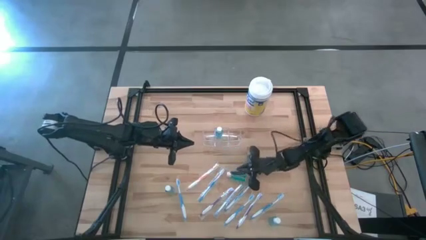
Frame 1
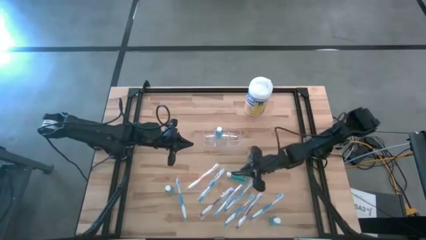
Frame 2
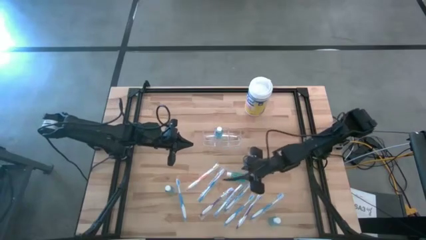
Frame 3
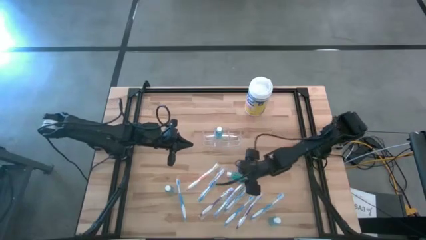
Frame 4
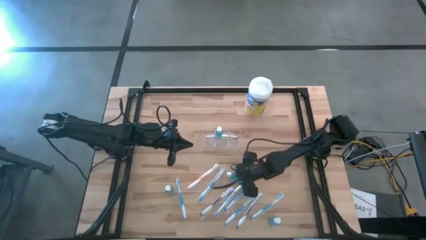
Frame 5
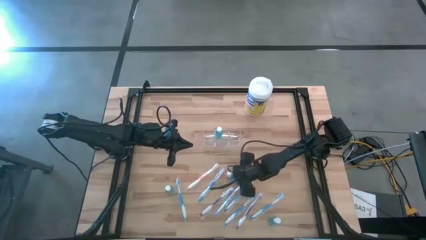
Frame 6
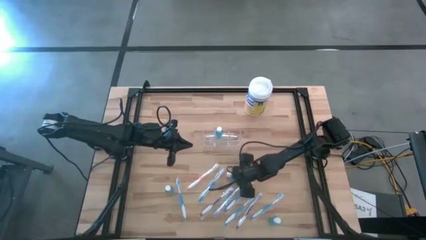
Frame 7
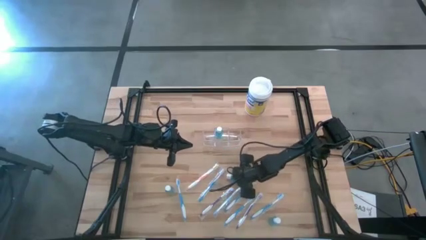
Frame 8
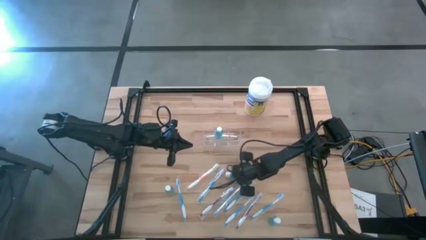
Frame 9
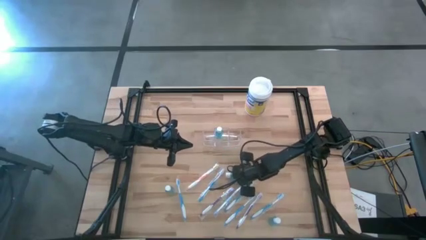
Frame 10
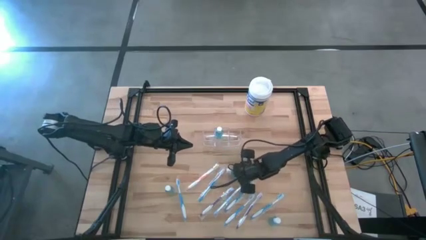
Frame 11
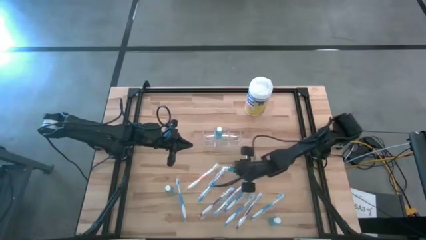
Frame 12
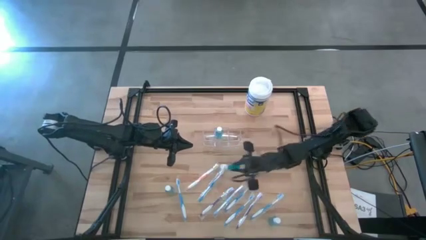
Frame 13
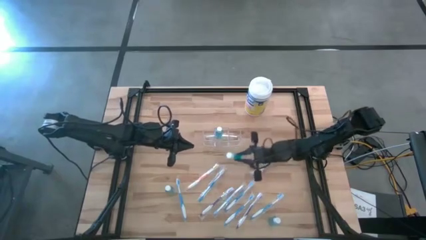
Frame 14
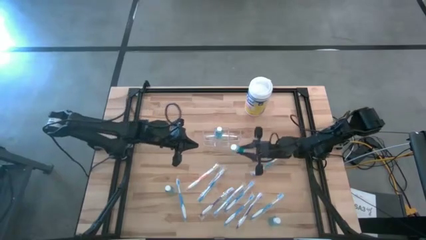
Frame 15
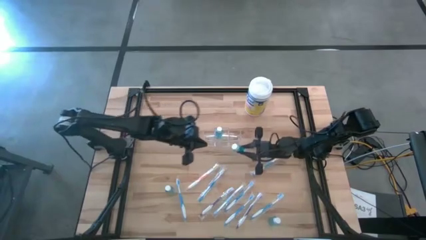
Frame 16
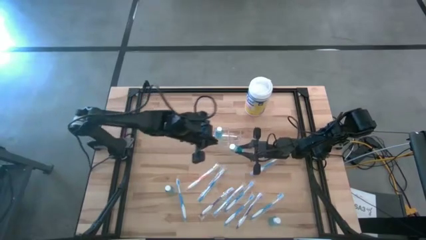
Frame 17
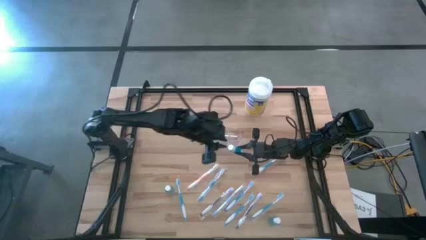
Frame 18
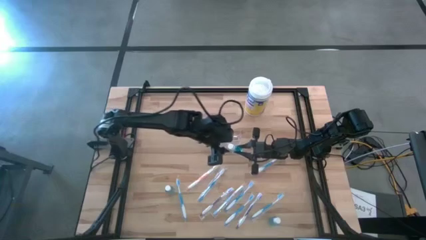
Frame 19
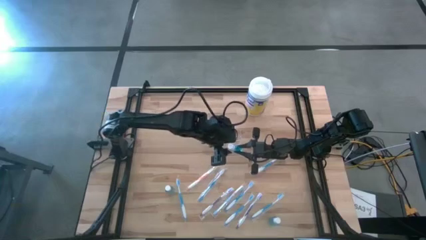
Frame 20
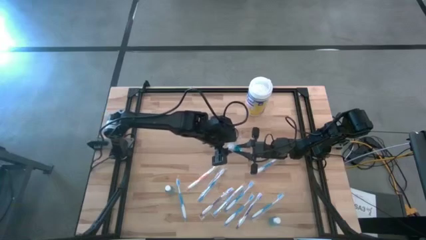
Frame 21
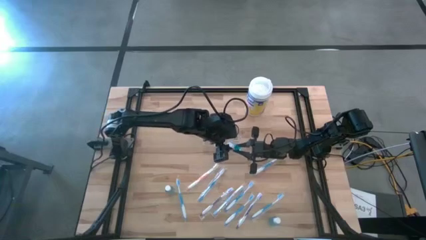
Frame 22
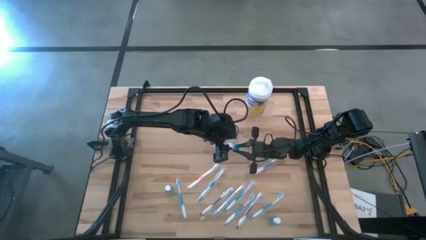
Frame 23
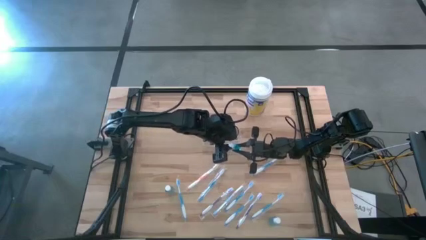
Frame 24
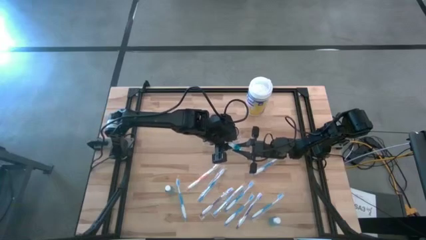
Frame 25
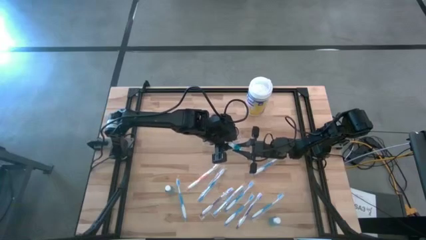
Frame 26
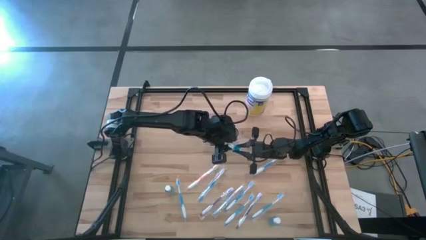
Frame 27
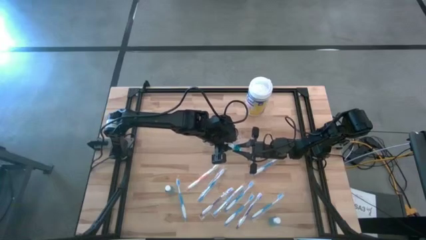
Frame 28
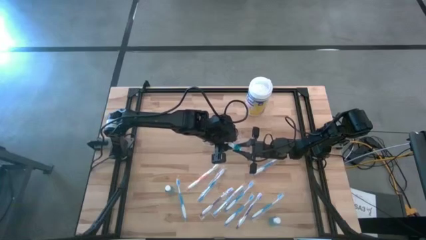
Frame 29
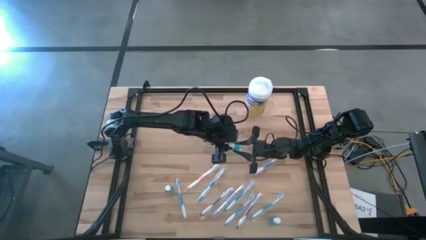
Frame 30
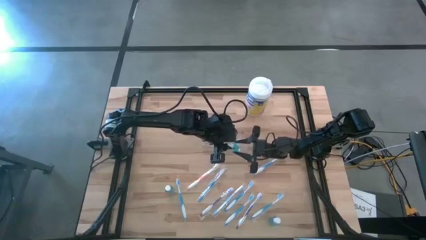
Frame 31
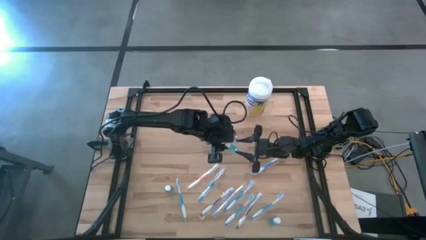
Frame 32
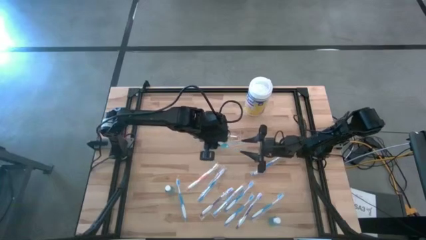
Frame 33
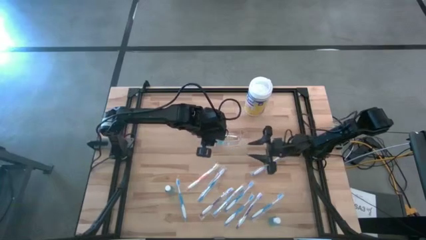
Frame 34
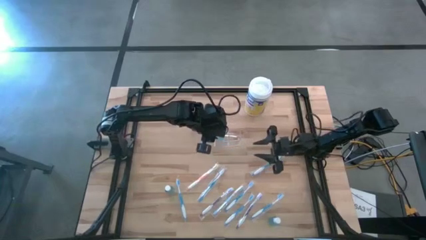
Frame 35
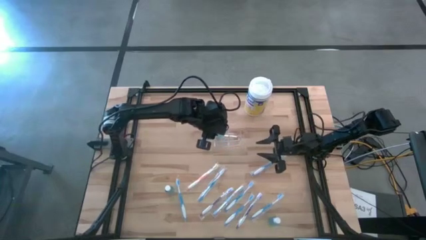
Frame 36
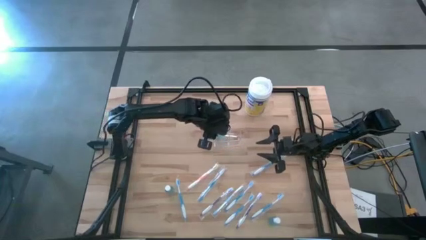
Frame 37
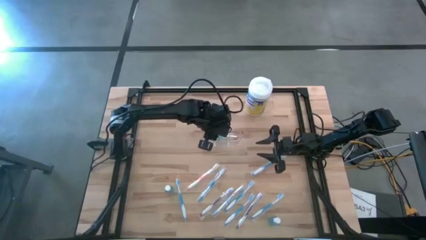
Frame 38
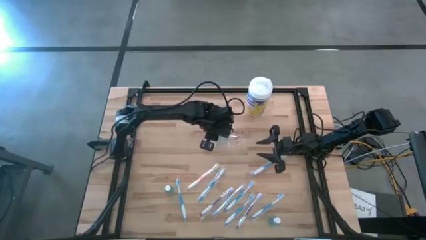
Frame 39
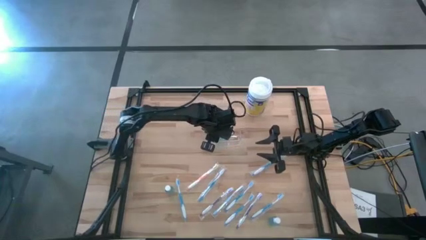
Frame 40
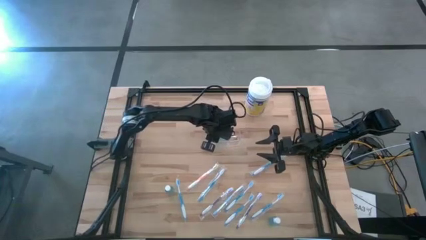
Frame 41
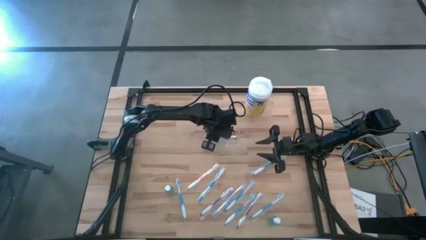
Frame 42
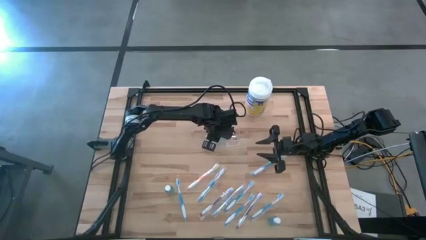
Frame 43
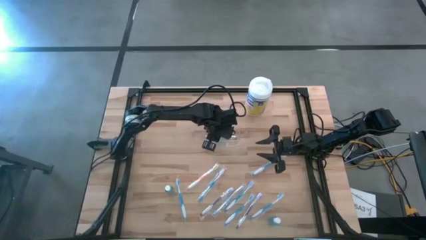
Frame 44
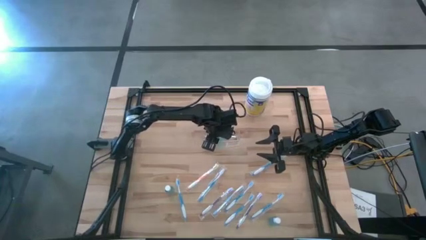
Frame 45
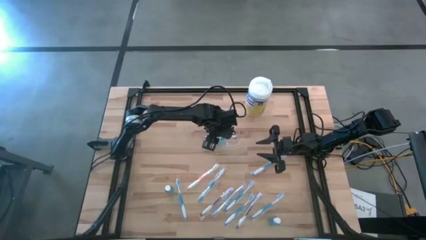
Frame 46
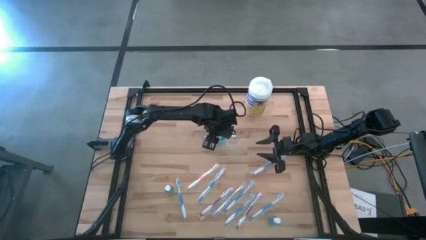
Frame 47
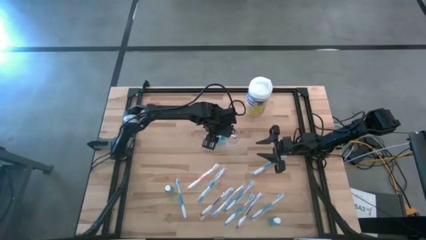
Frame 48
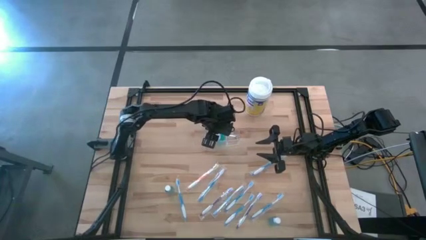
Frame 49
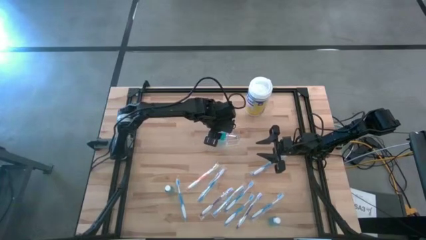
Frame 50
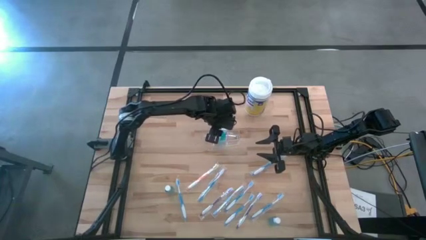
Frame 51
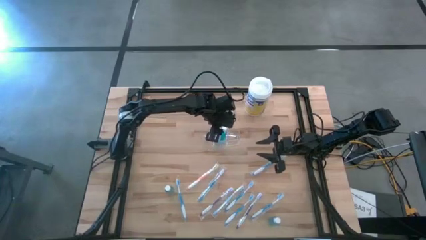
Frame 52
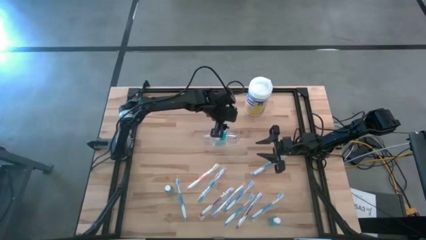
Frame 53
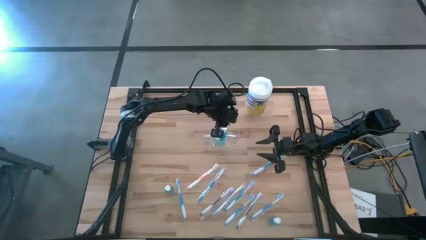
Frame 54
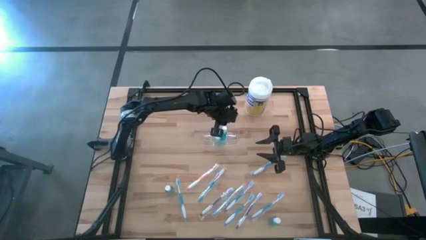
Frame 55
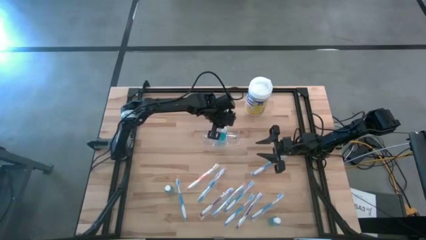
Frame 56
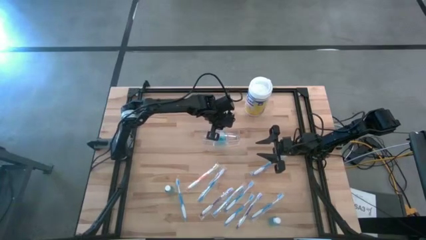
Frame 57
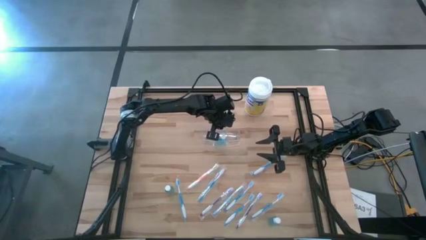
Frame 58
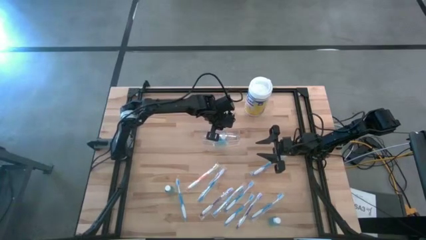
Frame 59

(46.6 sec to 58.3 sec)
Task: Pick & Place toothbrushing station
Put the blue mouthwash into the transparent organizer
